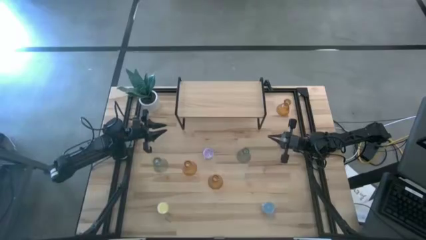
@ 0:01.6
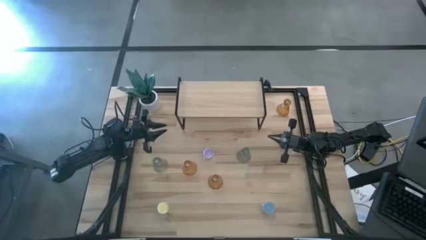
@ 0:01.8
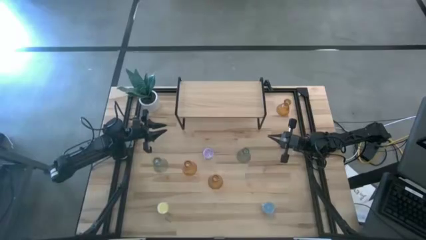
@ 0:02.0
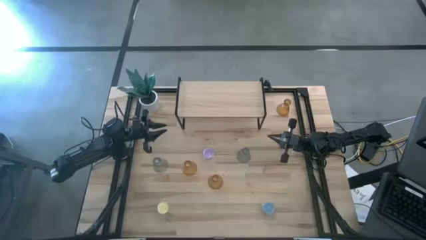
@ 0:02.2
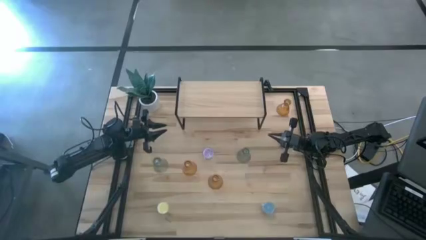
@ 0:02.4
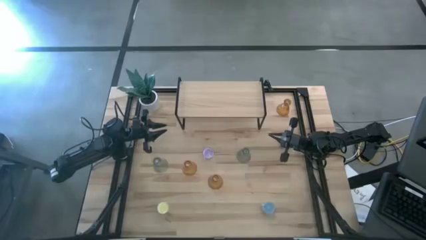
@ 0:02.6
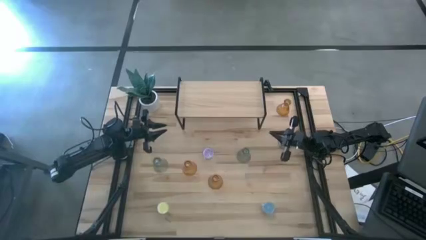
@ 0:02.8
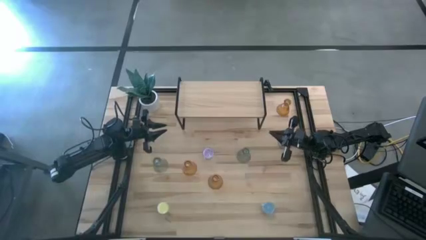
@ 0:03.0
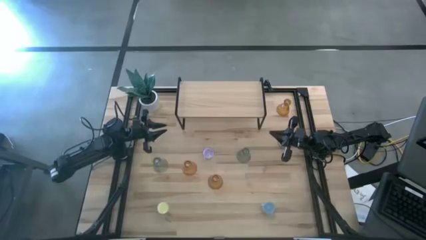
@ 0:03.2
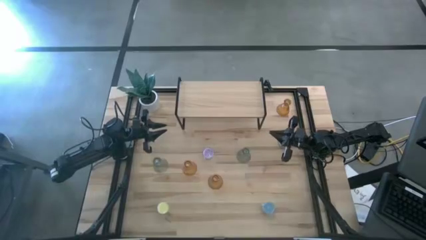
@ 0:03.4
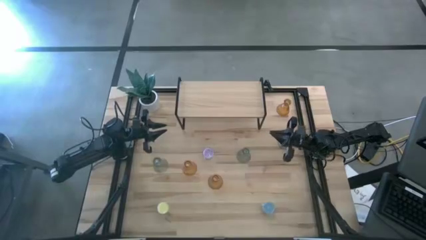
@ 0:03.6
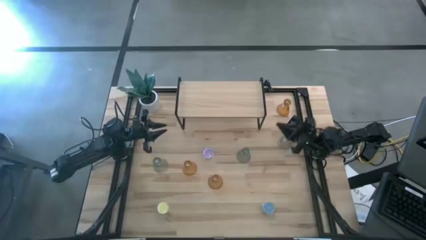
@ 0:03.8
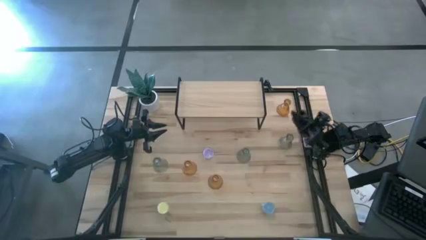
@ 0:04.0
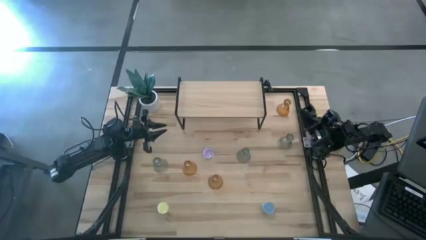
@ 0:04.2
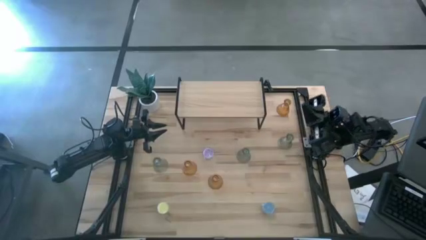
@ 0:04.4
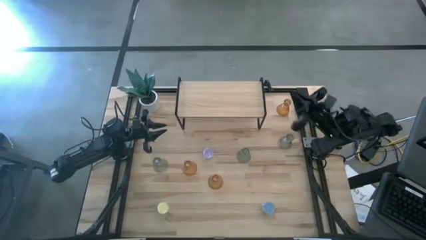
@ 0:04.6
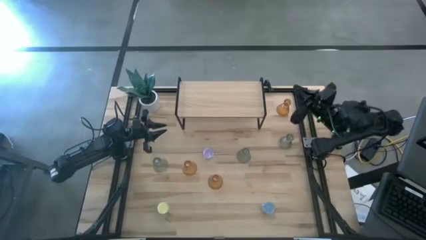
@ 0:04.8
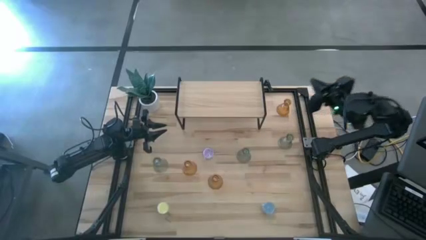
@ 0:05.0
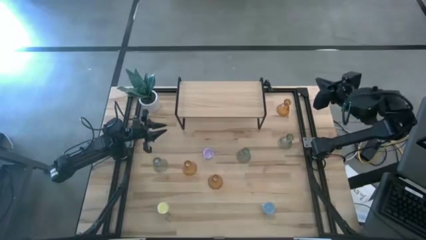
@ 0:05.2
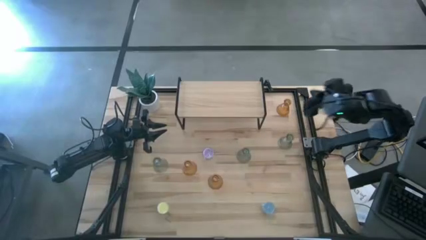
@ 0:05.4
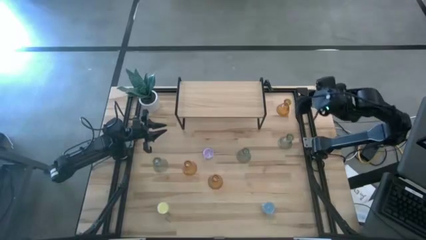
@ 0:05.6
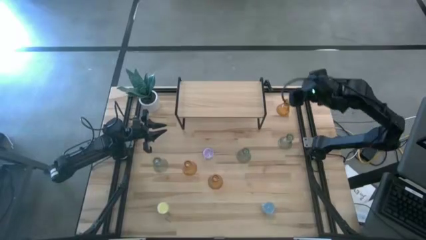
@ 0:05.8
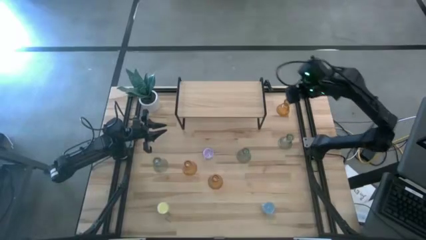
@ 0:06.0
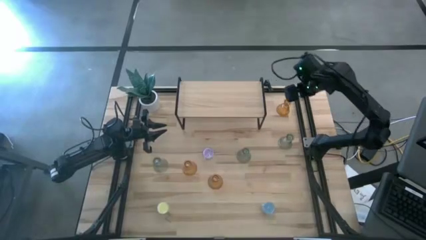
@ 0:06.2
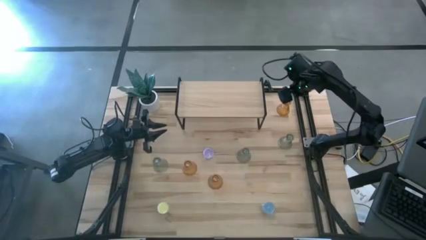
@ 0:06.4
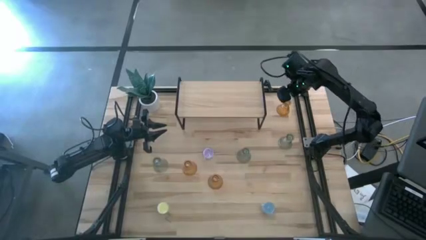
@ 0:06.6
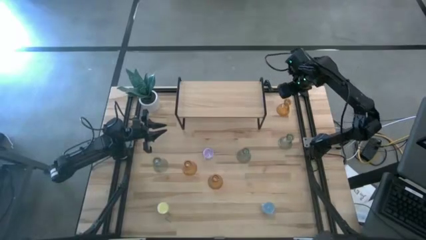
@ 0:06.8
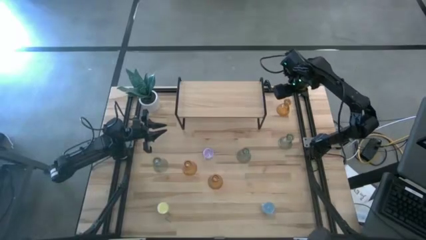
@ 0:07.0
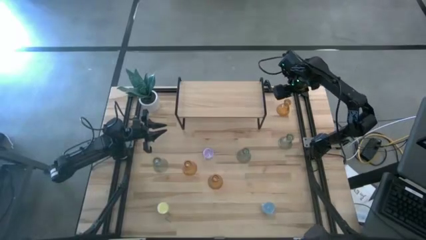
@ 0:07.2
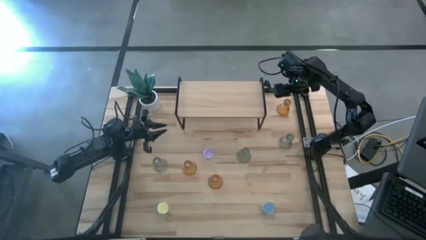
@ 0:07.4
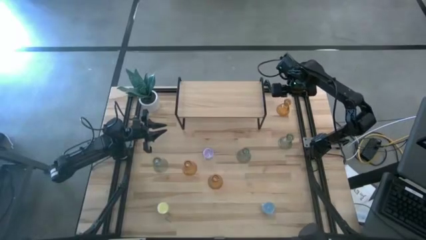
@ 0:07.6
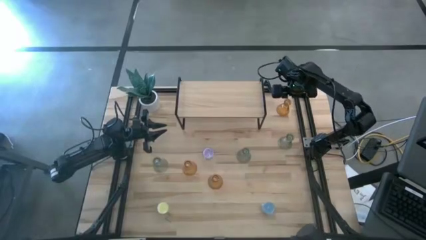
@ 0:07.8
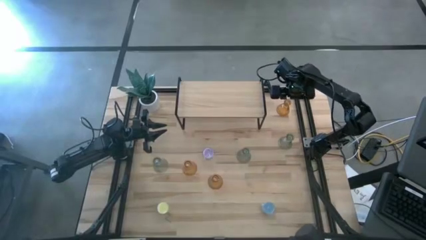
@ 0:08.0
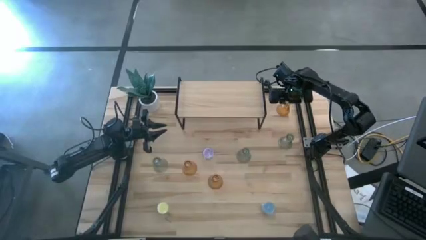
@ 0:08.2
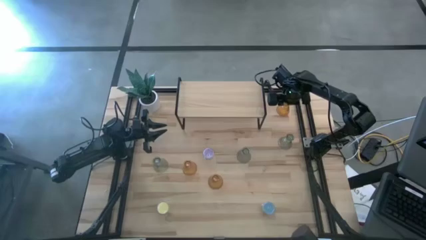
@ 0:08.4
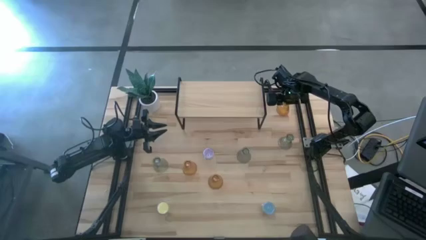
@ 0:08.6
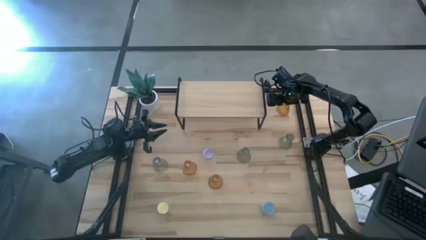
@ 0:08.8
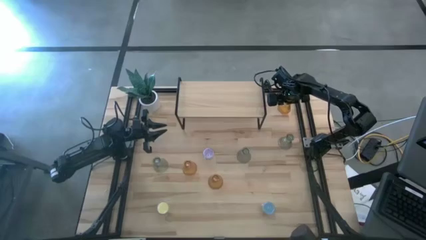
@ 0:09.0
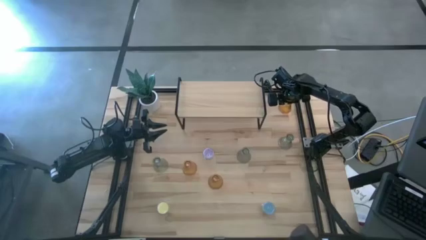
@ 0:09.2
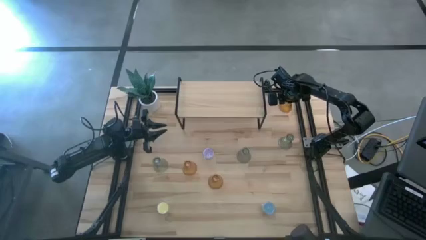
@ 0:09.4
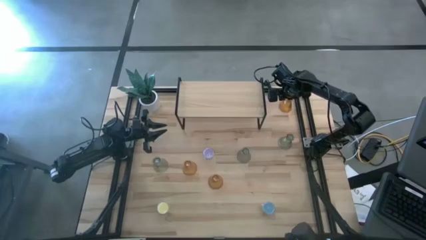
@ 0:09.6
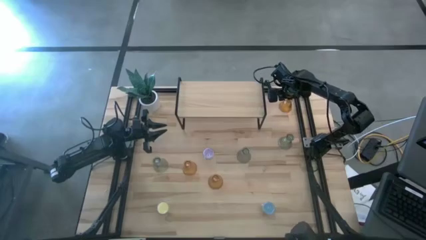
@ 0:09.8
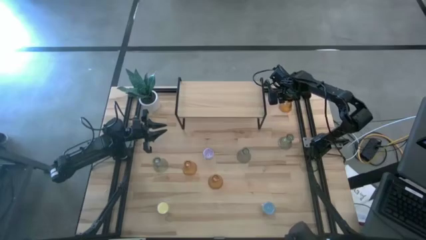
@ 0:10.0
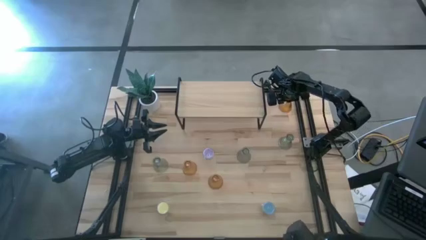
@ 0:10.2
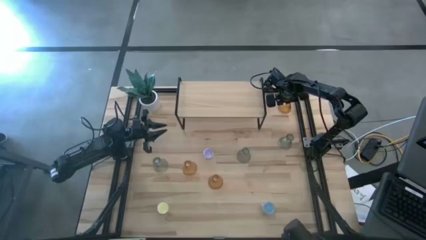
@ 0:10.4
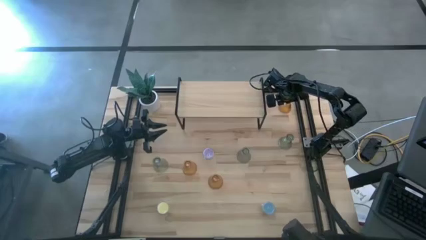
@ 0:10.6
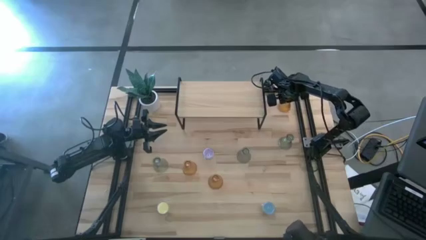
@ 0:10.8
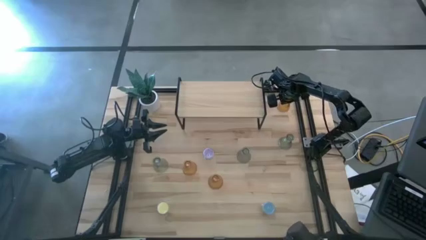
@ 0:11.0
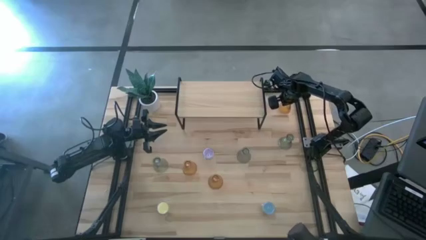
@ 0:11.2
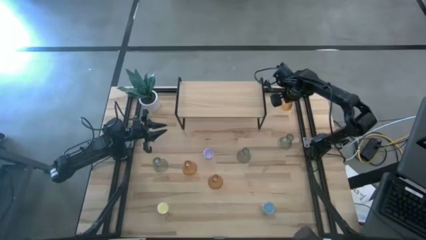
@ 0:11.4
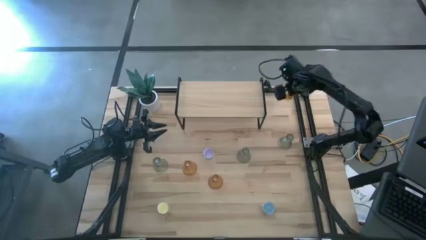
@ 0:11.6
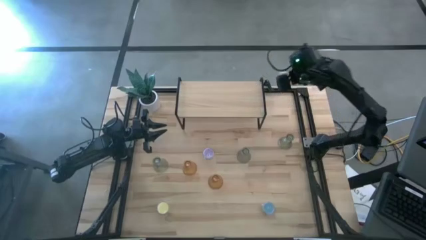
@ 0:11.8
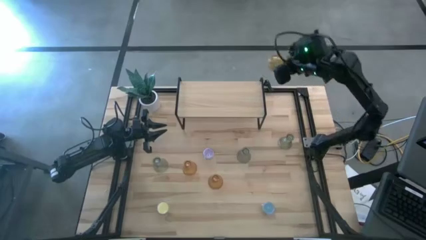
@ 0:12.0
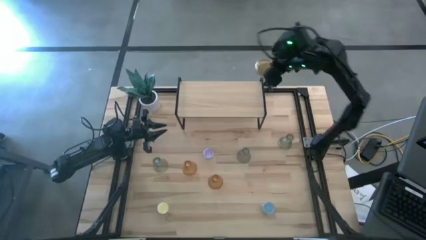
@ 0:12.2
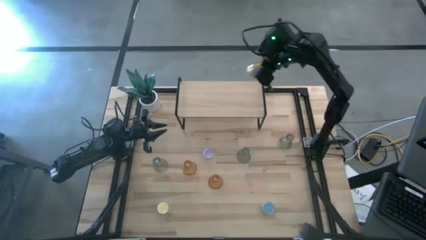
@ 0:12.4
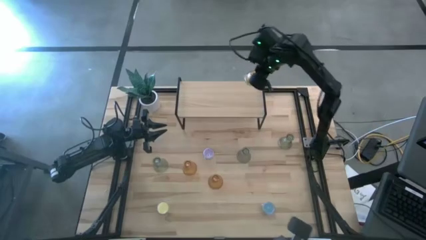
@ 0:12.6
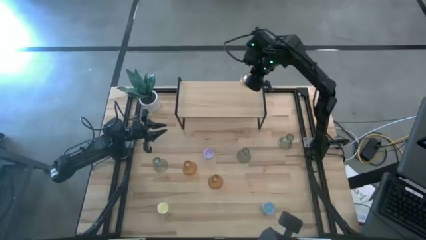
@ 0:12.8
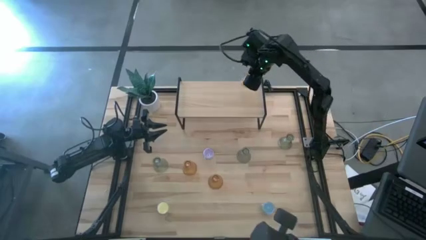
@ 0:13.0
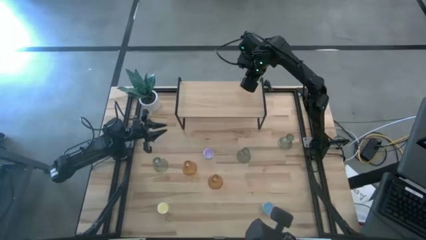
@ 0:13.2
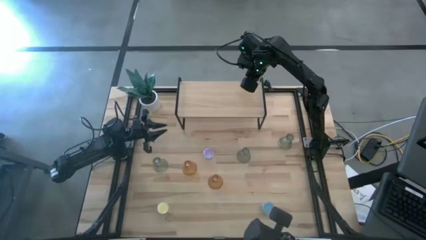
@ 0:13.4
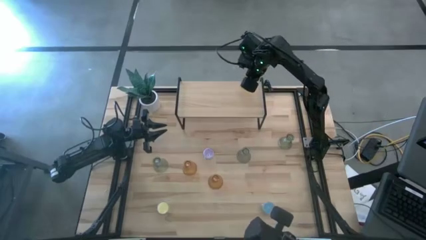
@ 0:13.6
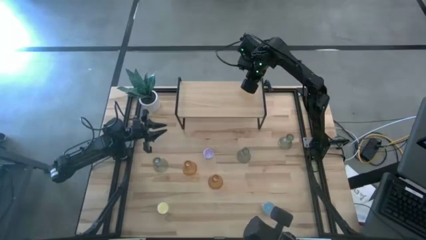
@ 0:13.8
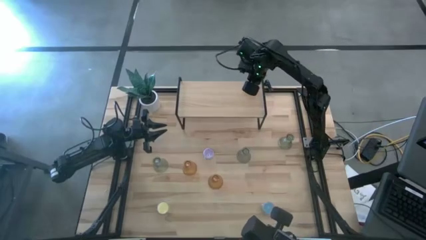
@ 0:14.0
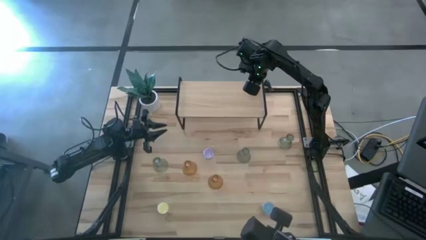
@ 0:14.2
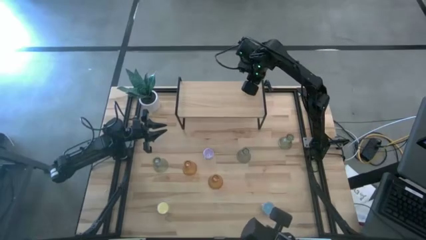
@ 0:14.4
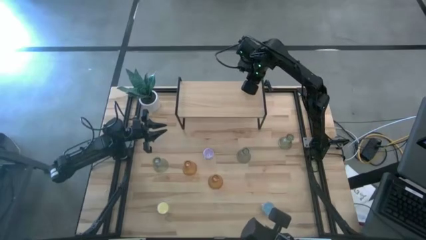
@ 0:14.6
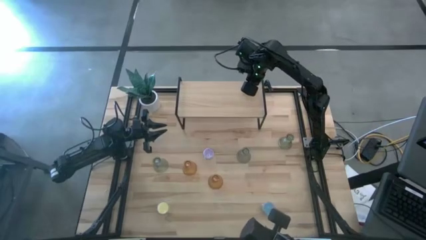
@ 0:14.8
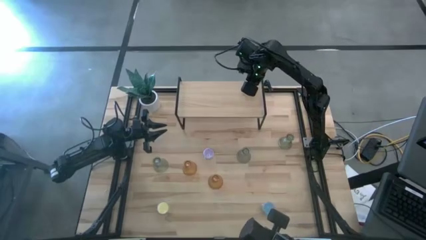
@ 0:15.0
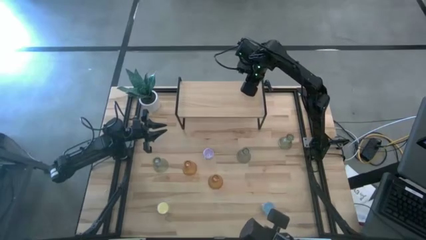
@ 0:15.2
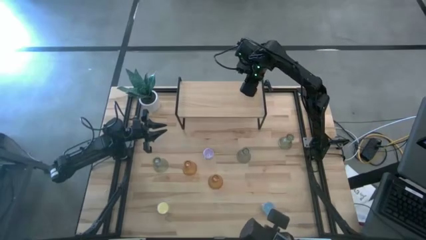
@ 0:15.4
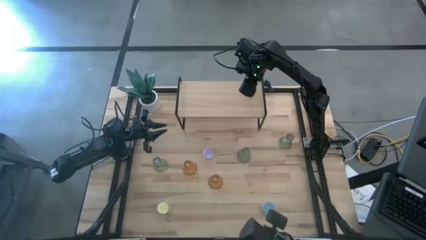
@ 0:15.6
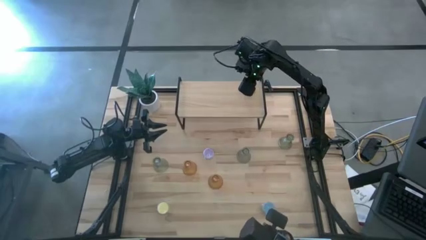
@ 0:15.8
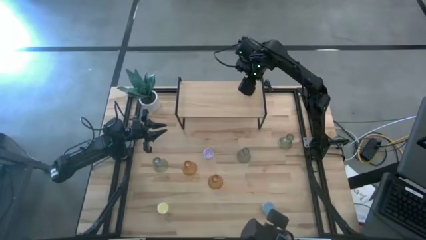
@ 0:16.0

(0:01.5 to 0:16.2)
Task: Pick & Place candle stick holders
Put the top brown glass candle holder on the shelf
